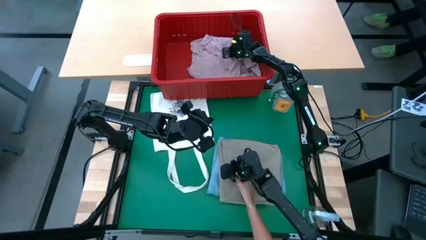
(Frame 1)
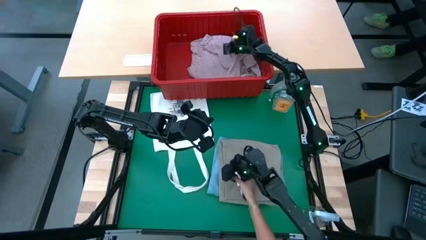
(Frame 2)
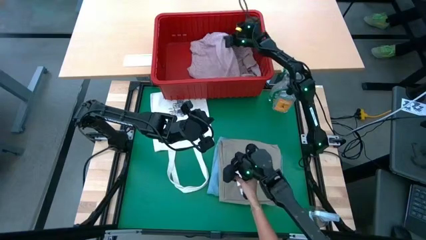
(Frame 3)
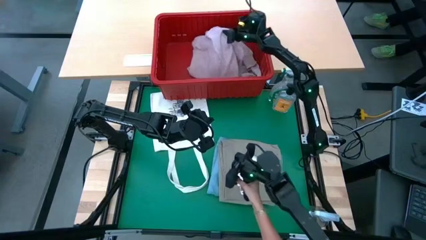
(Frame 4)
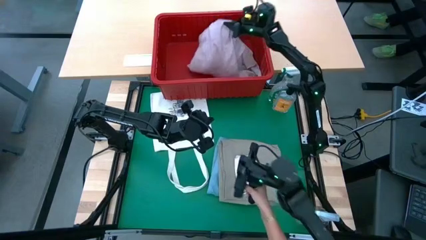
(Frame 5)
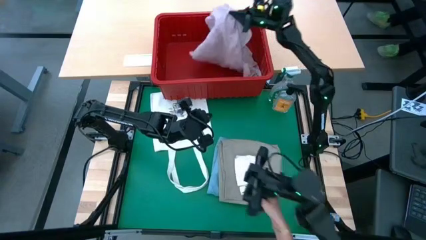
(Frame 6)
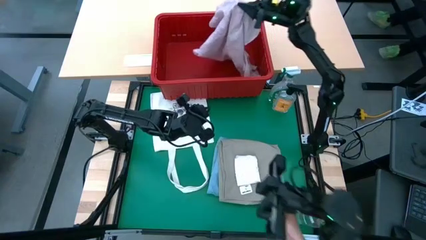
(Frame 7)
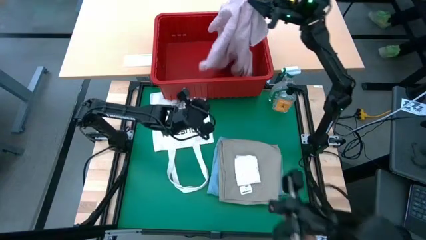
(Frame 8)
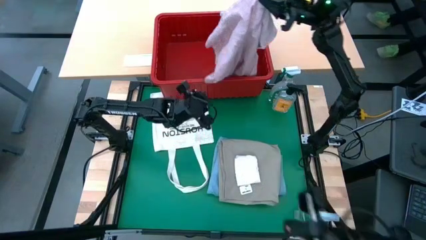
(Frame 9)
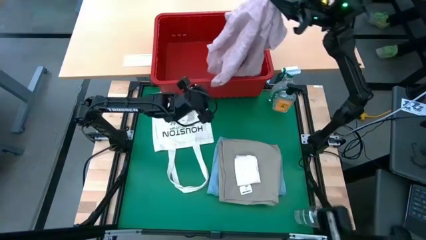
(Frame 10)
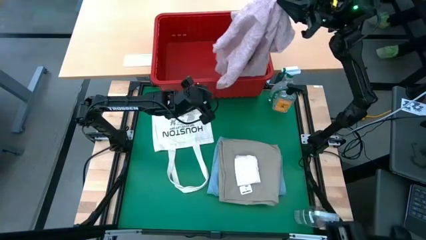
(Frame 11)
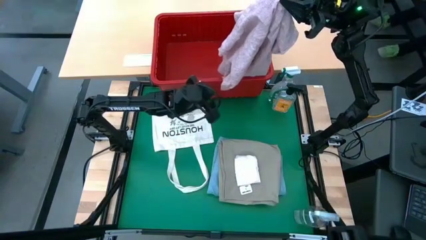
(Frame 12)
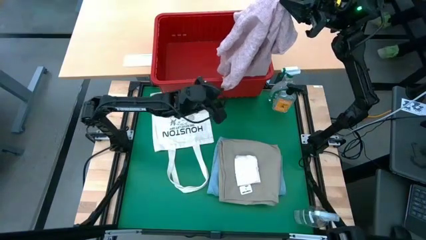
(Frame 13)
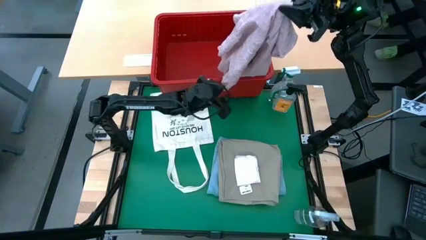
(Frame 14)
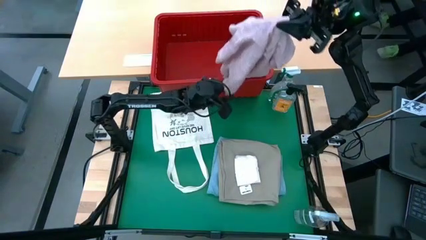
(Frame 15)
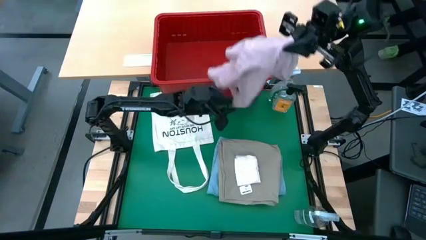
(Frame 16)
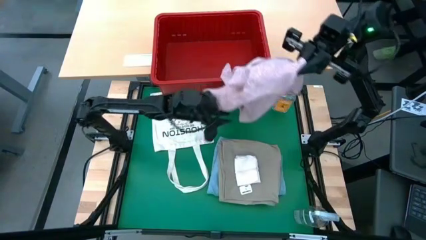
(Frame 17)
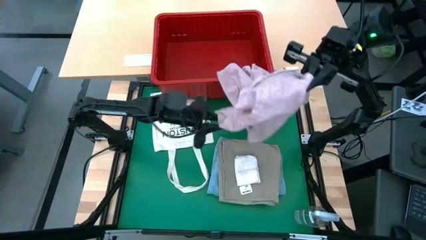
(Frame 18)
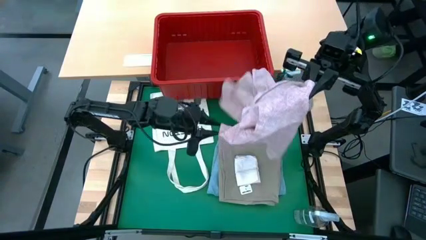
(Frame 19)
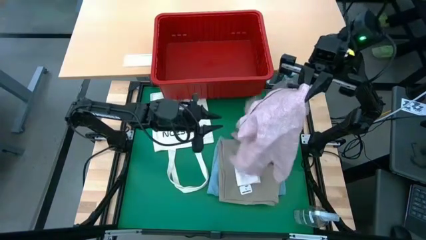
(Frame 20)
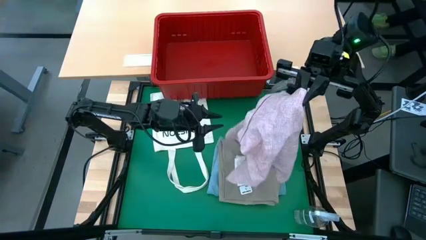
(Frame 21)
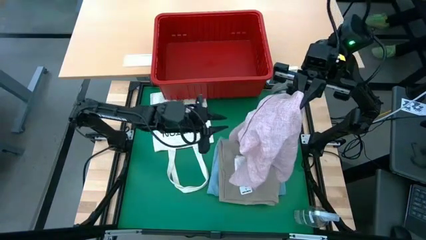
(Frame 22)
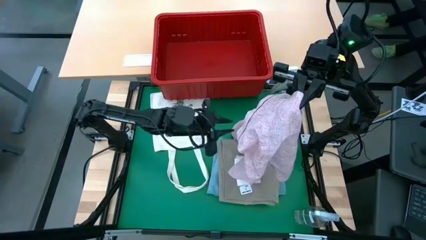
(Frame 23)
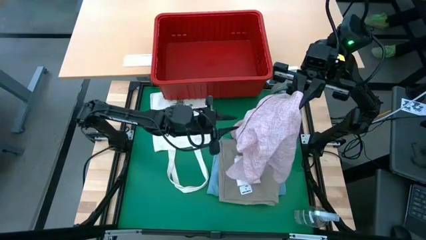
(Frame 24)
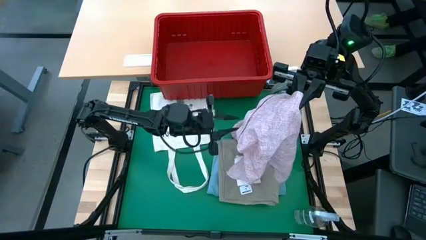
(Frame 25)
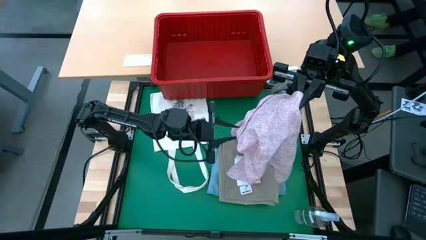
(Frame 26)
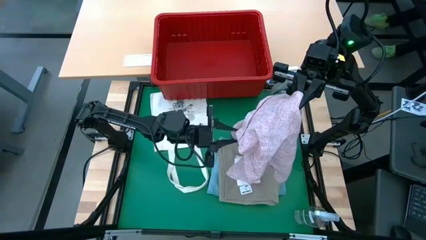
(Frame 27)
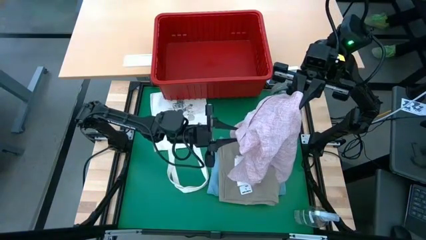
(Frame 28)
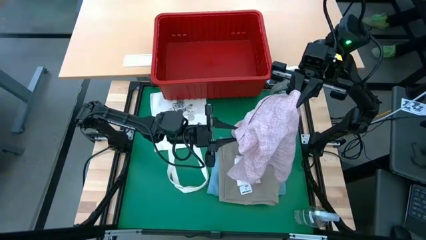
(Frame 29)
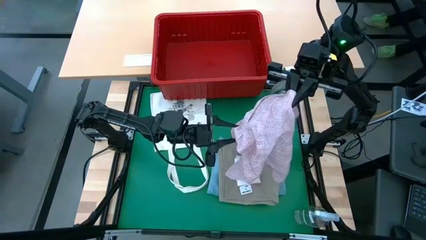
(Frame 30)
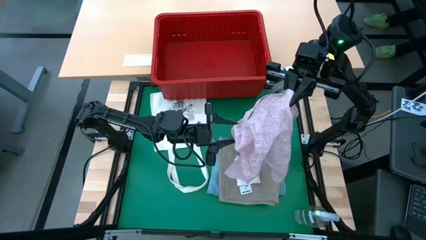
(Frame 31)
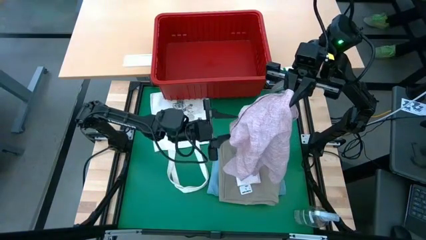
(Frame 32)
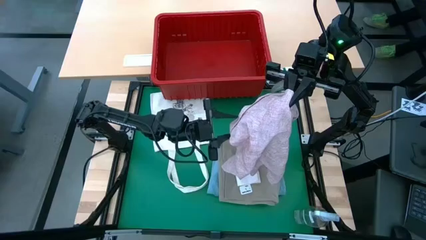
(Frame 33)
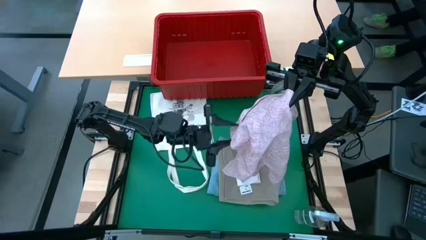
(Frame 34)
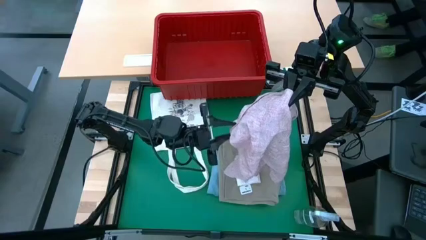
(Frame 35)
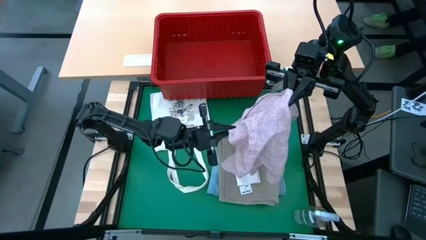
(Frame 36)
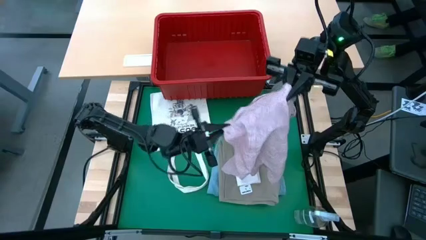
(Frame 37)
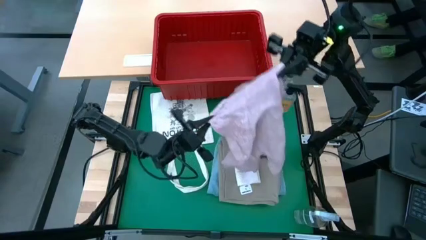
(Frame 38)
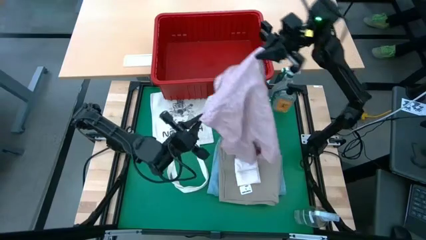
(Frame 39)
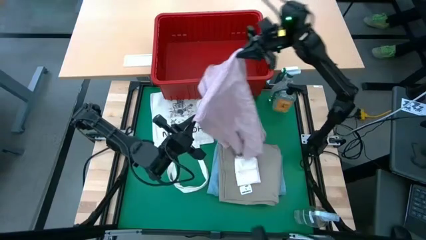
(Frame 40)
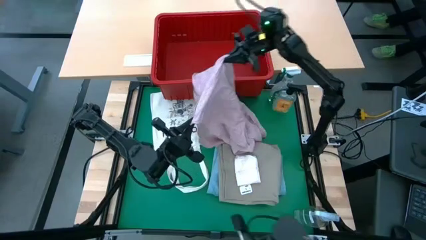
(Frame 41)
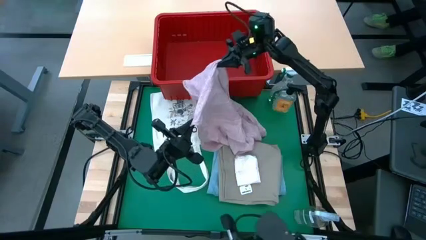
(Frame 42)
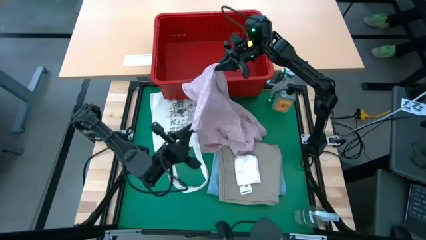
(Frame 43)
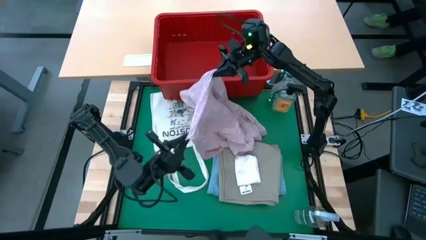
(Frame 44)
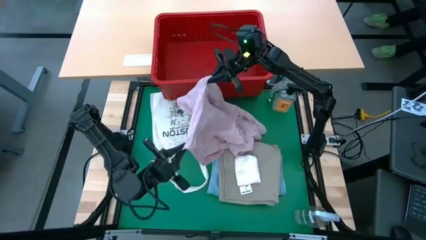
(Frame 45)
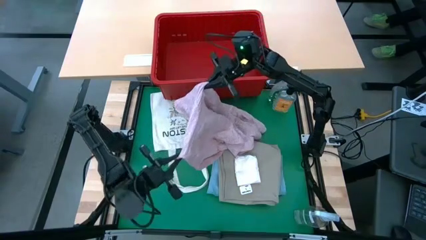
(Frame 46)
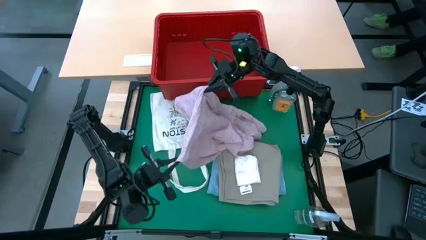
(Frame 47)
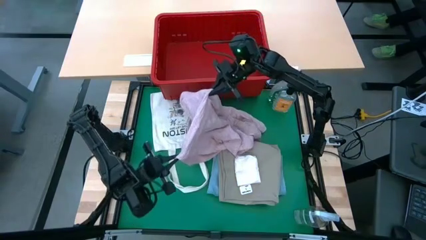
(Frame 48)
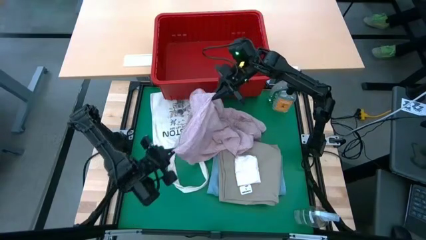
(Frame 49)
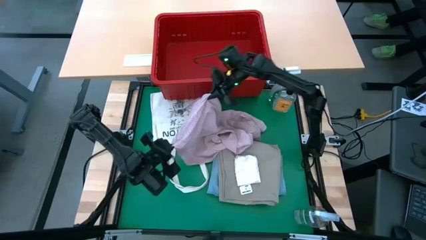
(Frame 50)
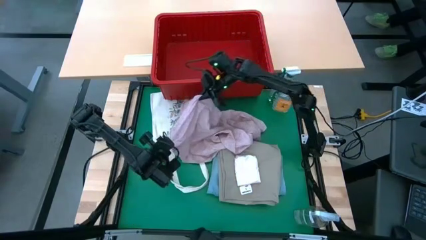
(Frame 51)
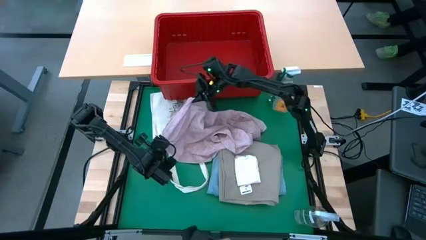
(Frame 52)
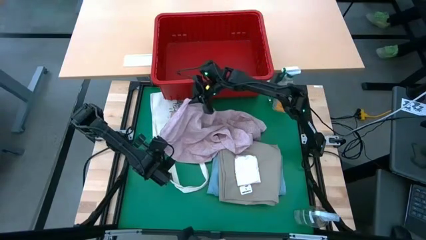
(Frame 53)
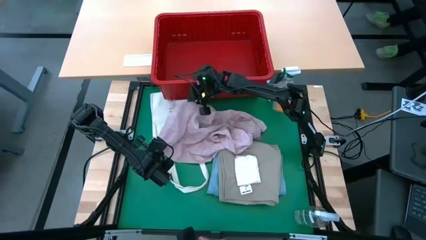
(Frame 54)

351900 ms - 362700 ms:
Task: Fold laundry
Remove the pink polo from the red bin
